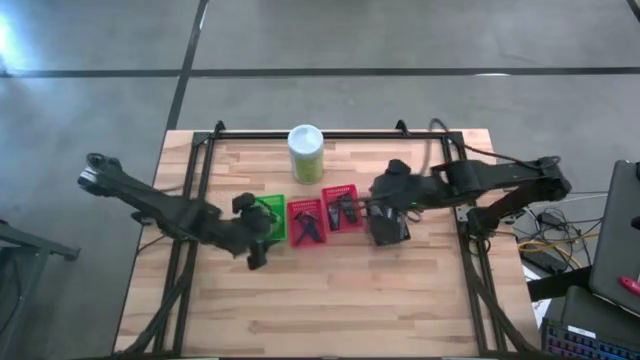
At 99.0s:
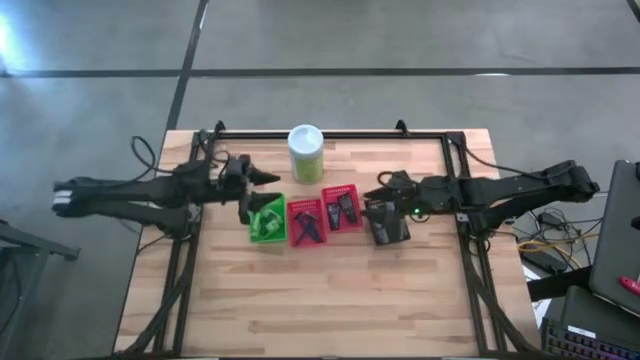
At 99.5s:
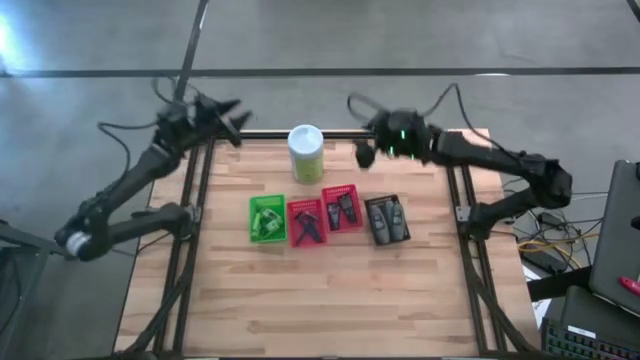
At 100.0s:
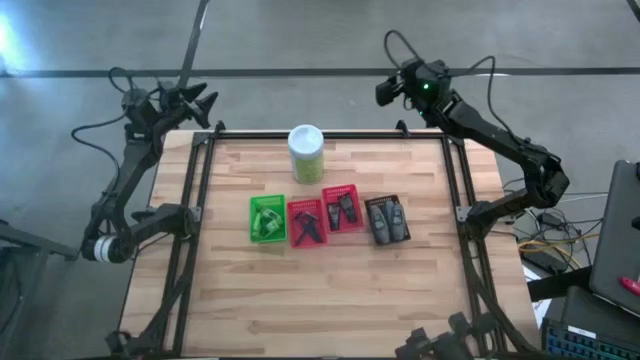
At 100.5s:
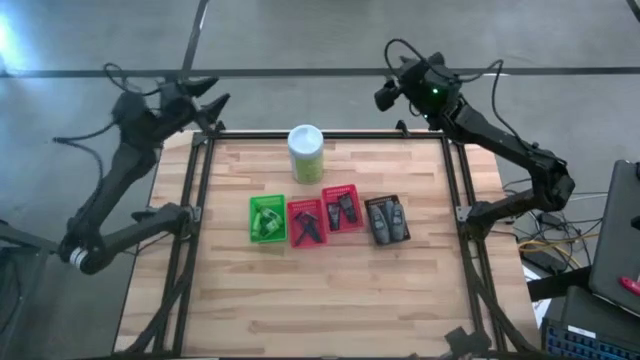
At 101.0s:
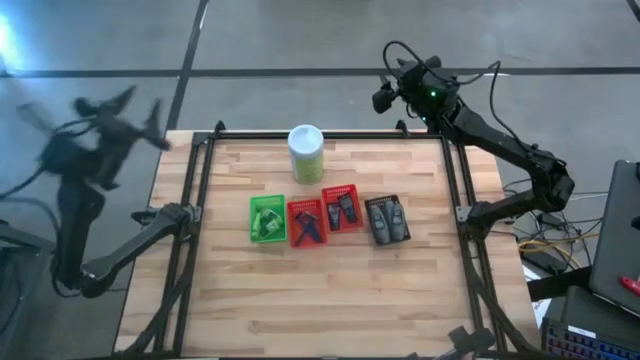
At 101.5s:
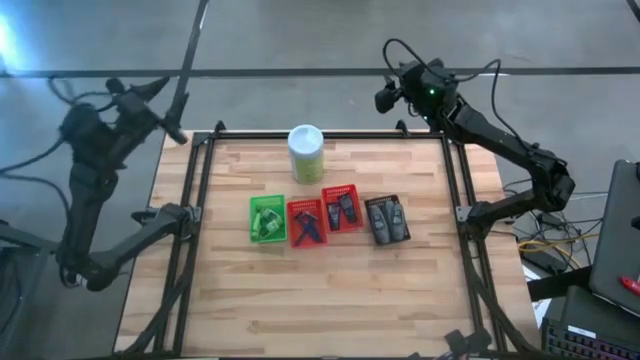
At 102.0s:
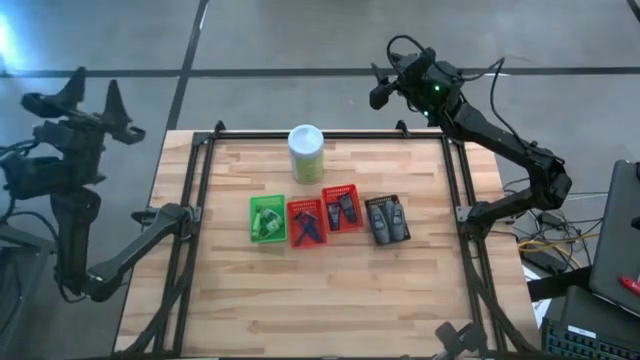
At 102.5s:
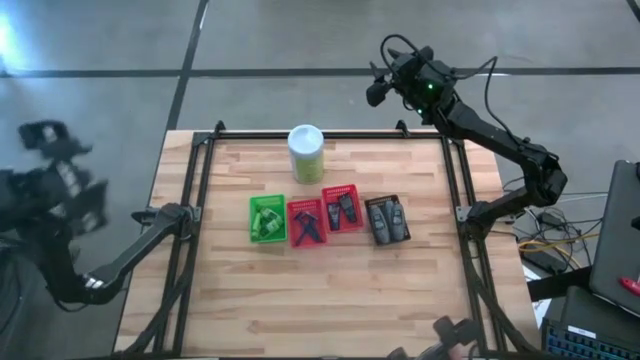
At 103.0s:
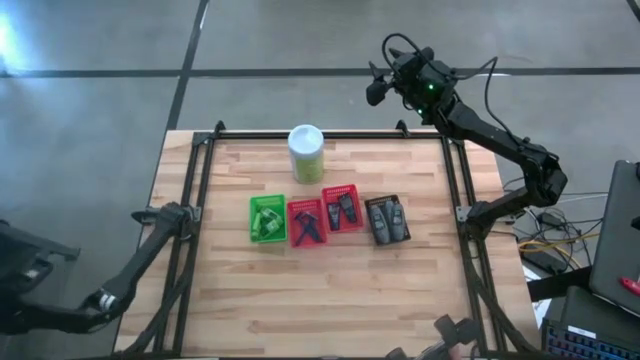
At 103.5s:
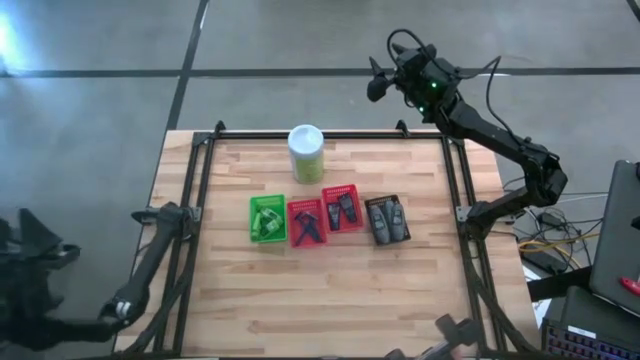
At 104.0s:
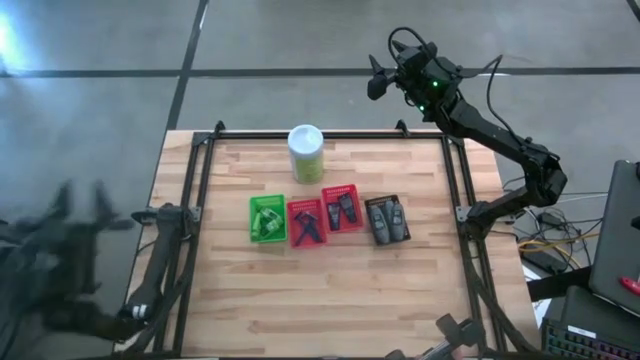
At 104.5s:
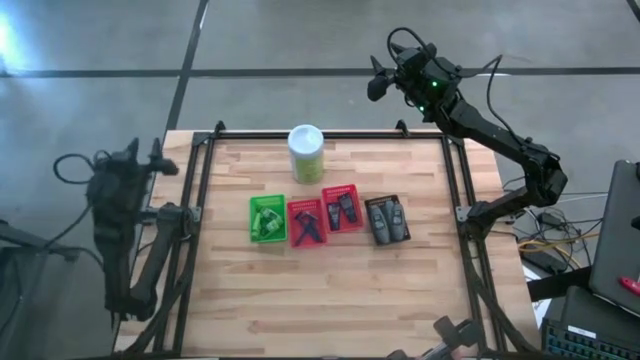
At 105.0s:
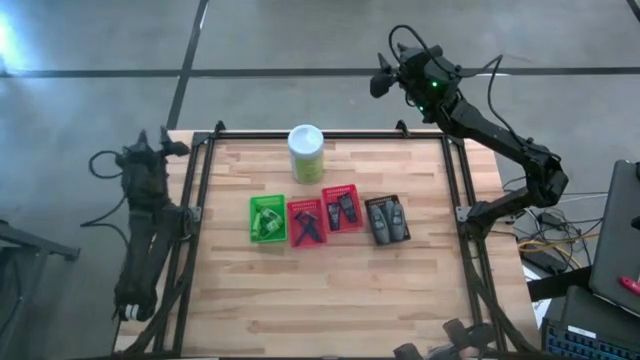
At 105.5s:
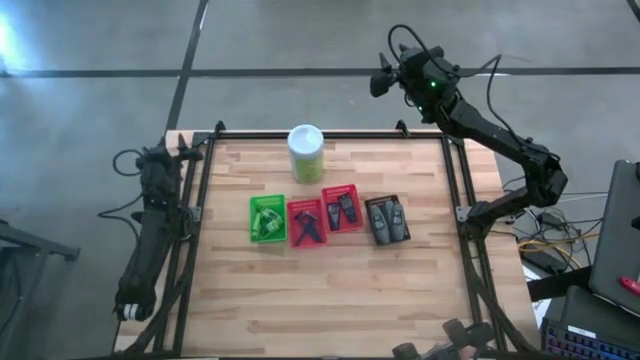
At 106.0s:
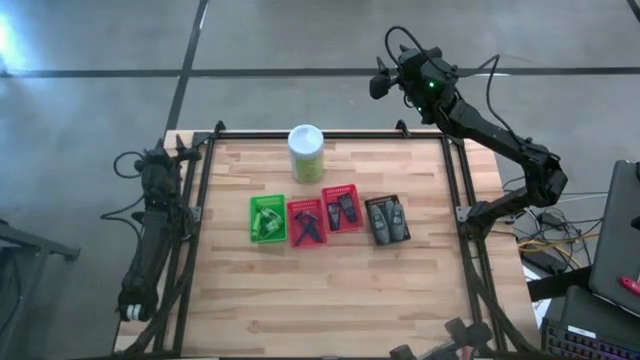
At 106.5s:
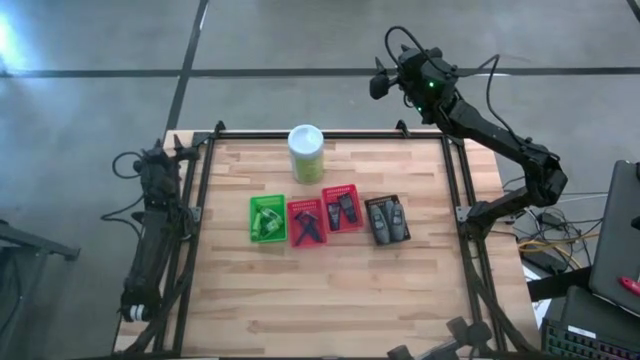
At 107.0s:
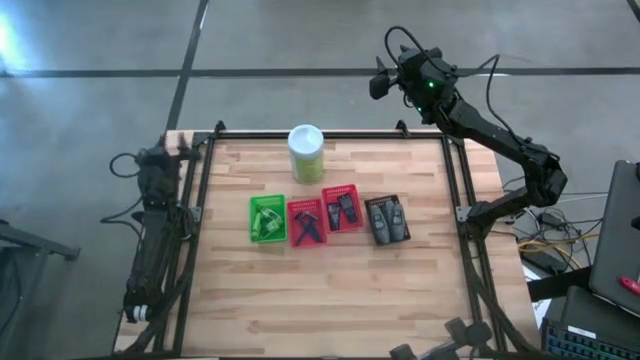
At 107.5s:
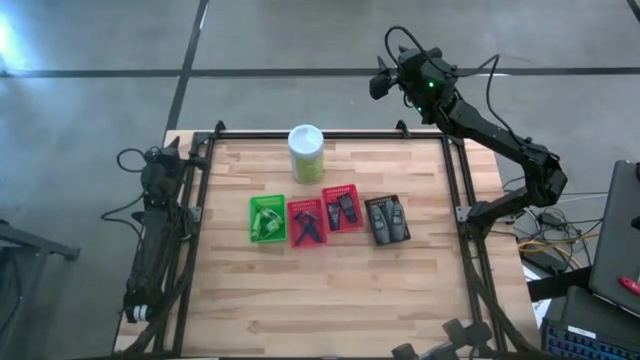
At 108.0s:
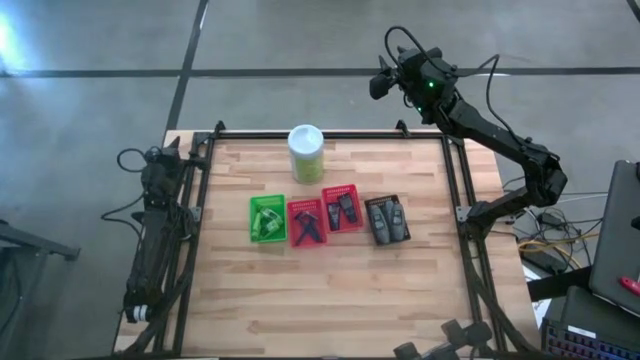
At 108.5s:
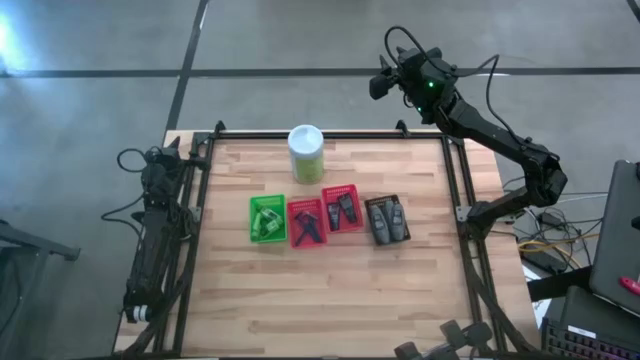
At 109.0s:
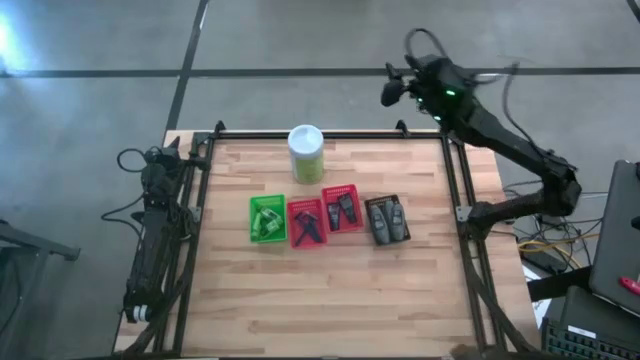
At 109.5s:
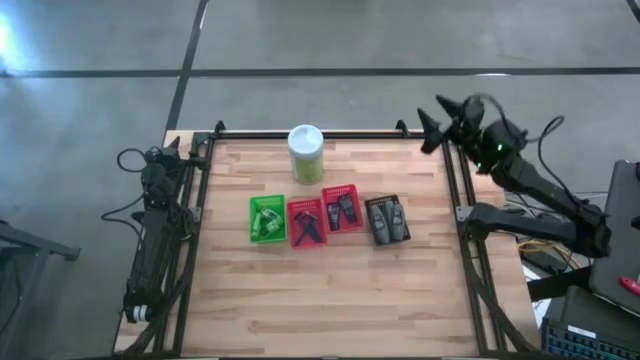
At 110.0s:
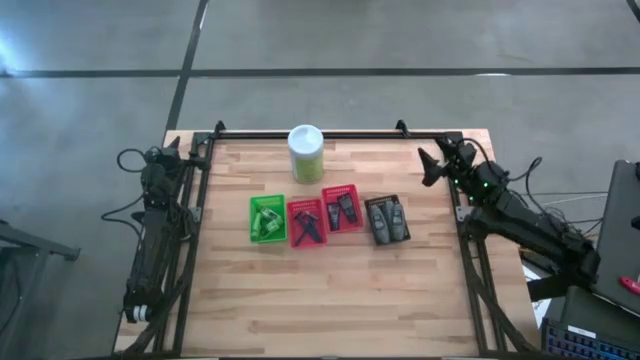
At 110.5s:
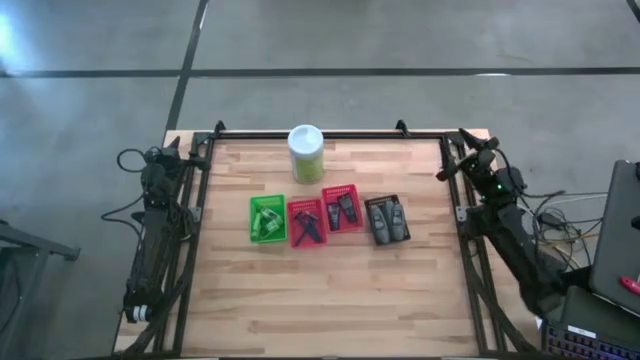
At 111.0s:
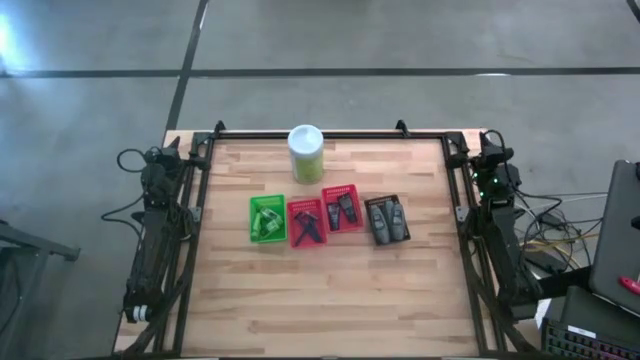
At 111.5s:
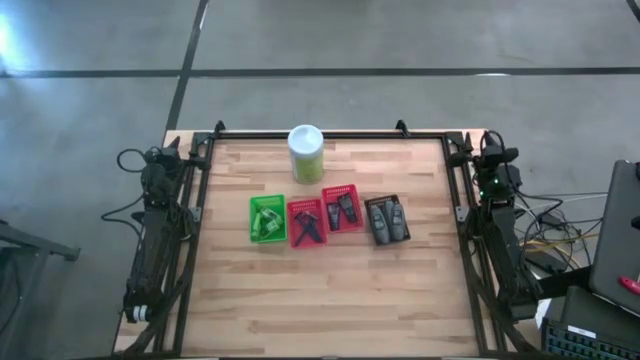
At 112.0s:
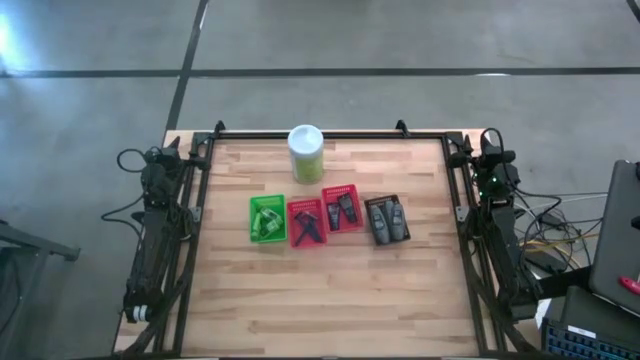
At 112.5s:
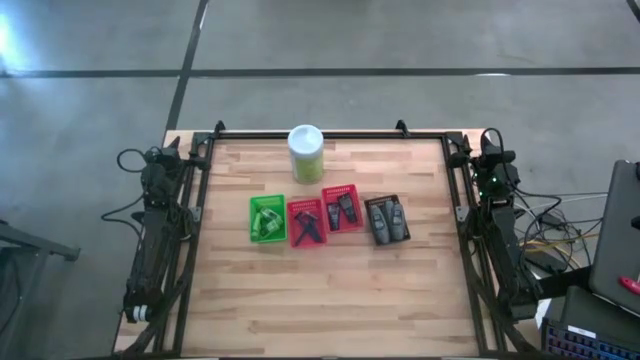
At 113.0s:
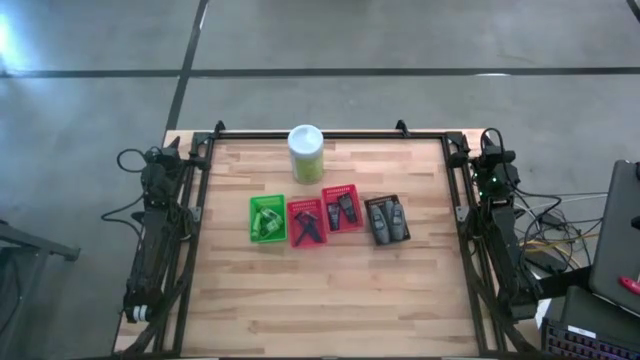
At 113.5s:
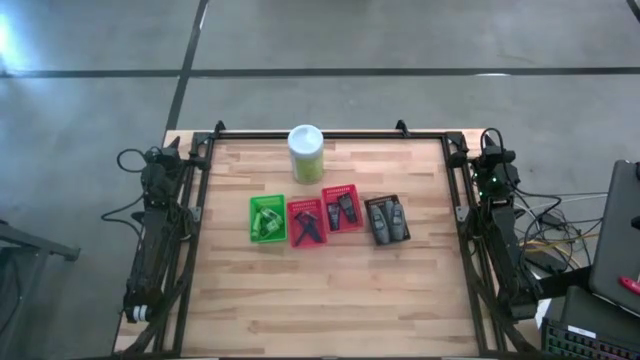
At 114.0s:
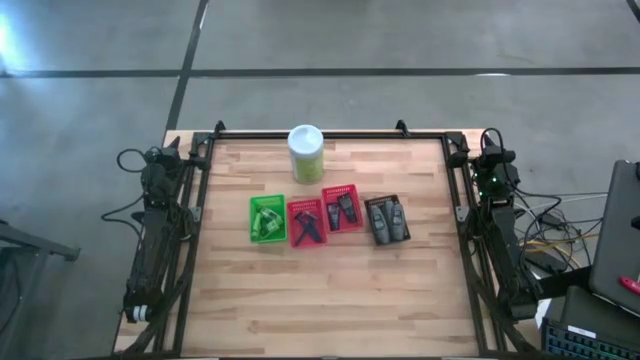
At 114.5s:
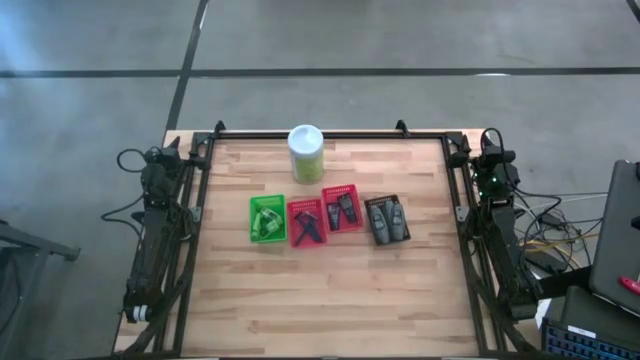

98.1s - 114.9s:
Task: Pick & Place Travel size toiletries
Return to Home Position

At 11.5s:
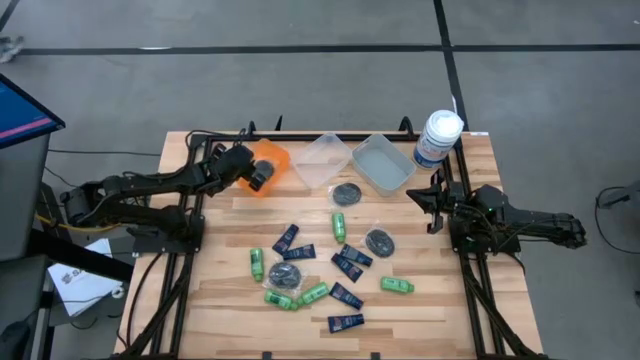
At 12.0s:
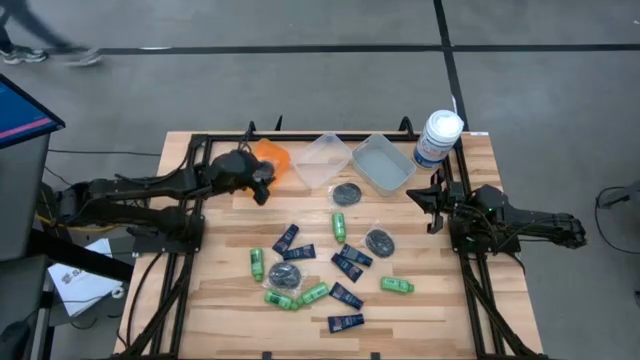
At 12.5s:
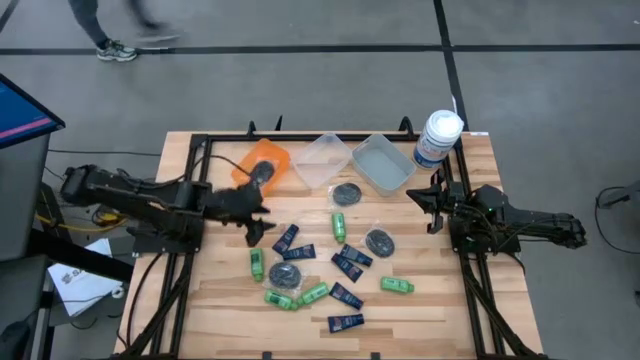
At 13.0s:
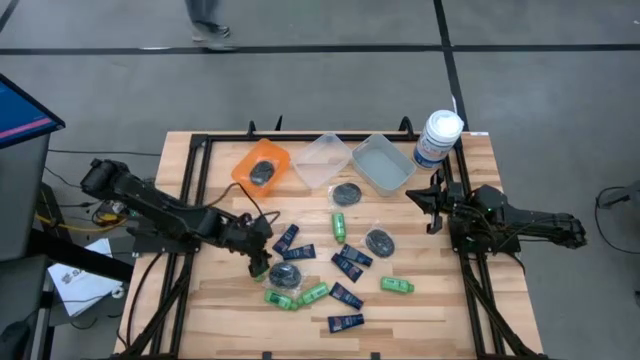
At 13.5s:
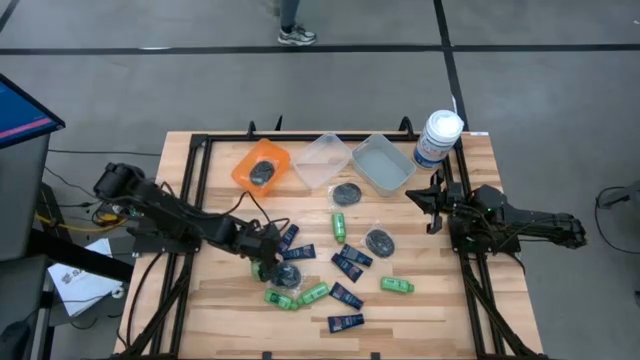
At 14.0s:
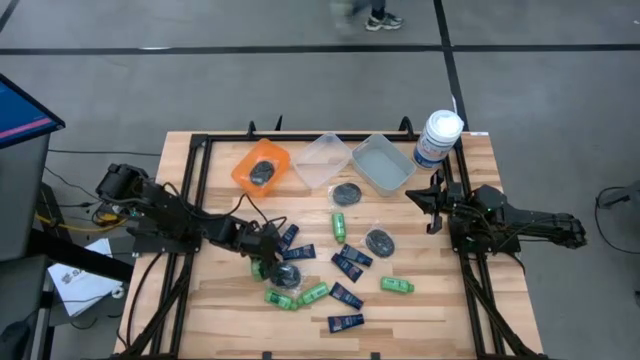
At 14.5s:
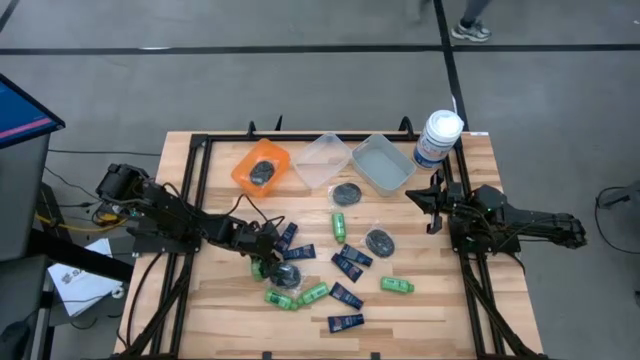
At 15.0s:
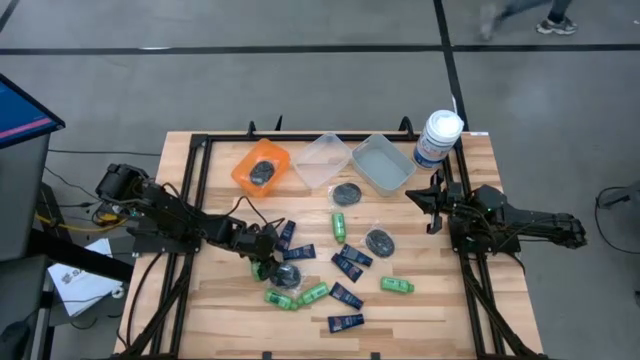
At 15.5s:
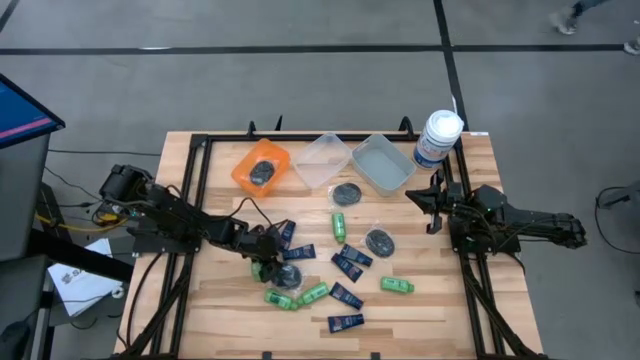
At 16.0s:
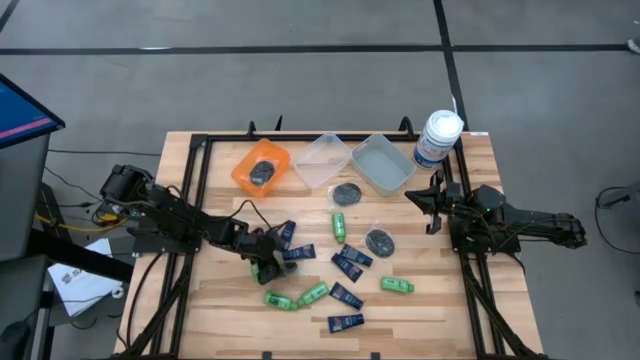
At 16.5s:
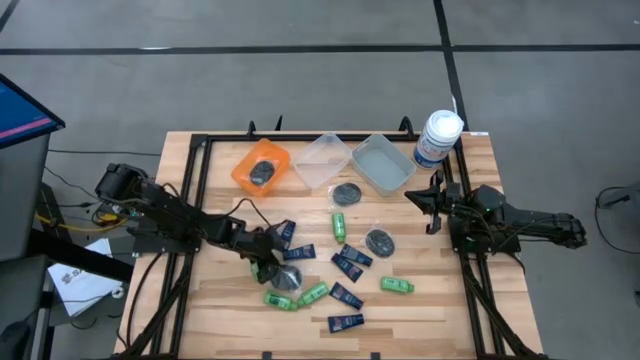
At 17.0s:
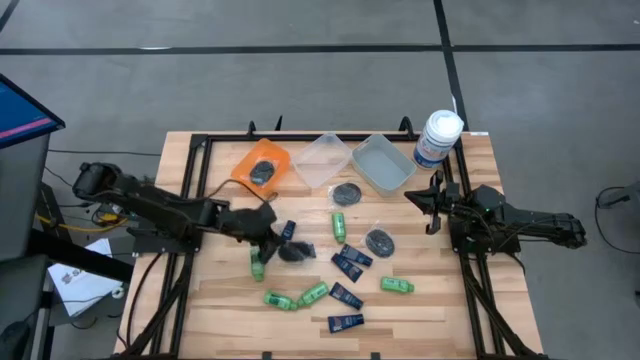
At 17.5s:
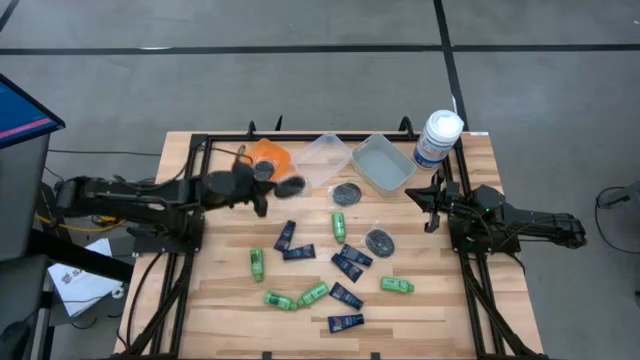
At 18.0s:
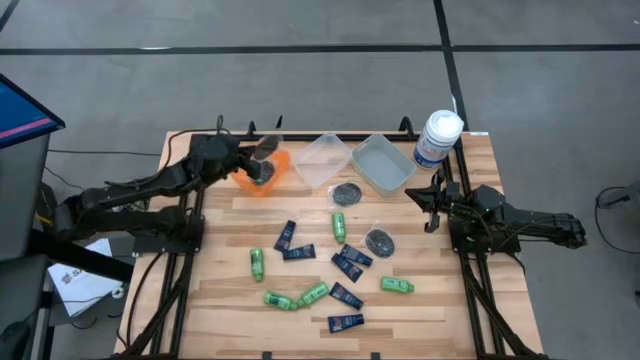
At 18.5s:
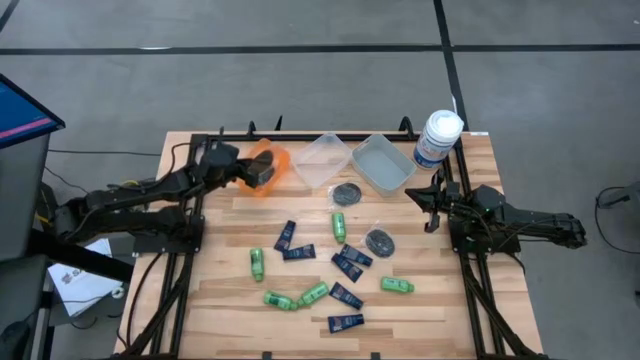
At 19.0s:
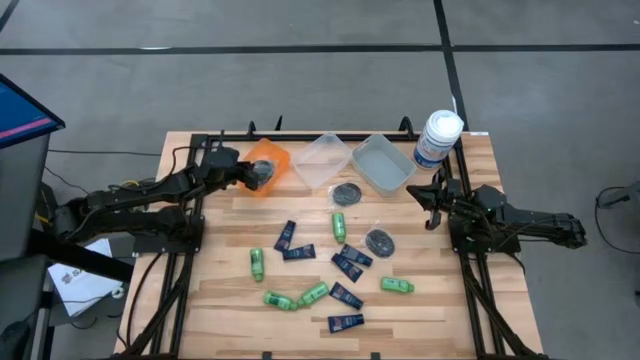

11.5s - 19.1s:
Task: Pick & Place Travel size toiletries
Put the hairbrush into the orange bin
